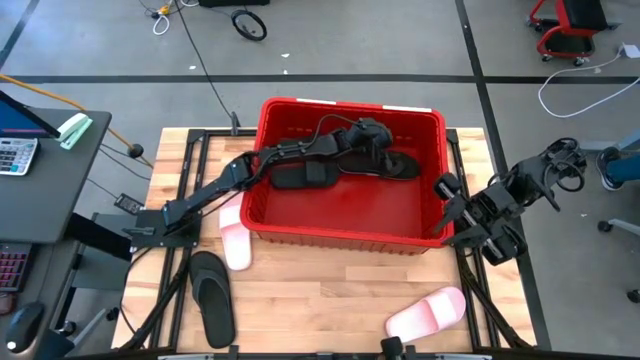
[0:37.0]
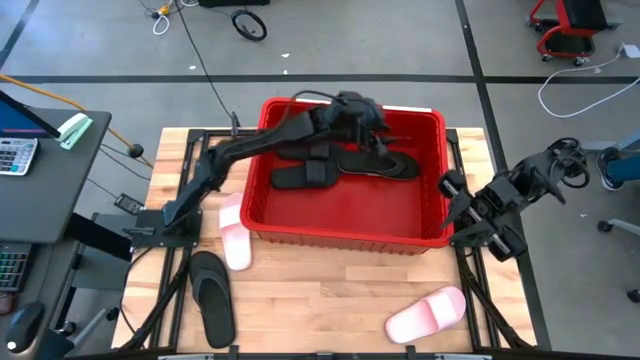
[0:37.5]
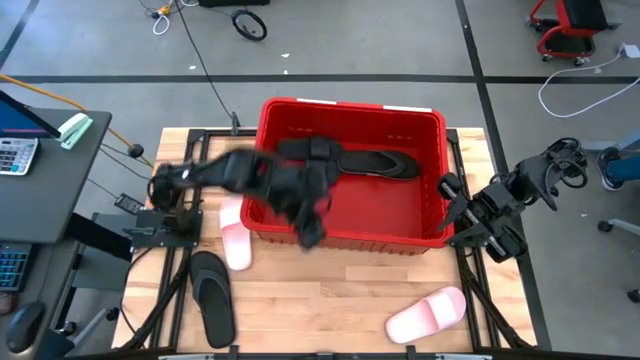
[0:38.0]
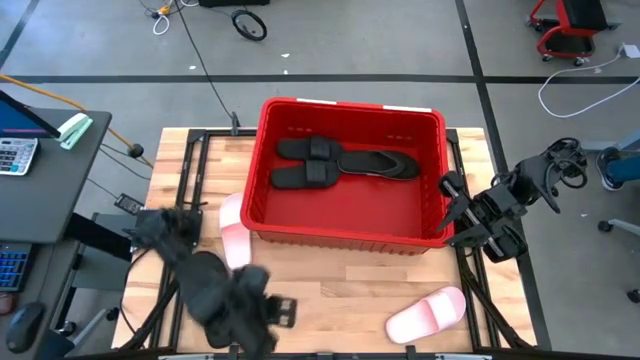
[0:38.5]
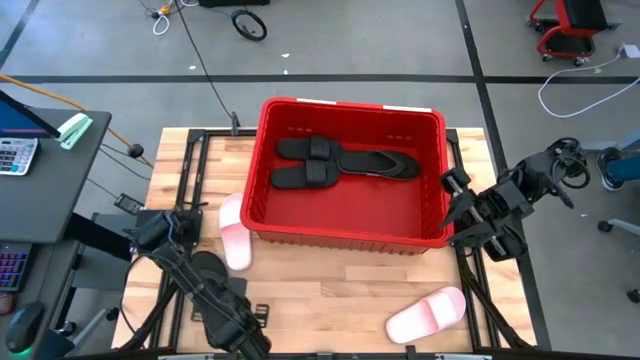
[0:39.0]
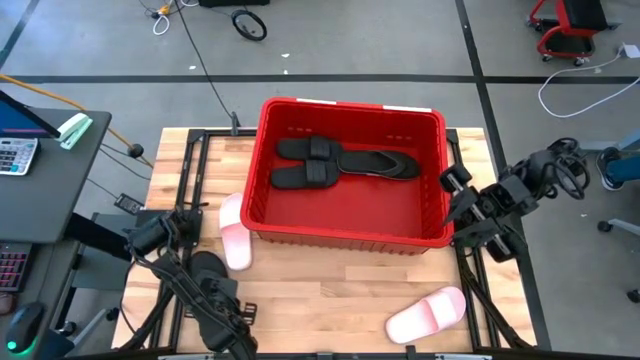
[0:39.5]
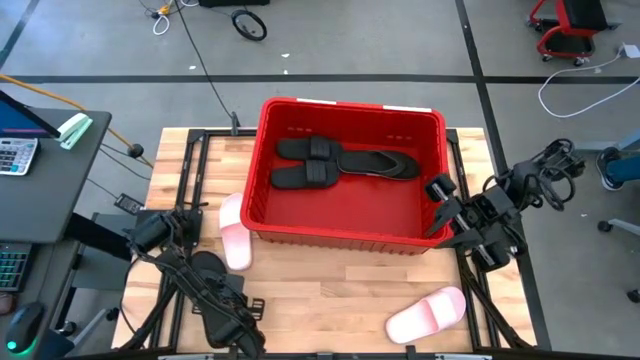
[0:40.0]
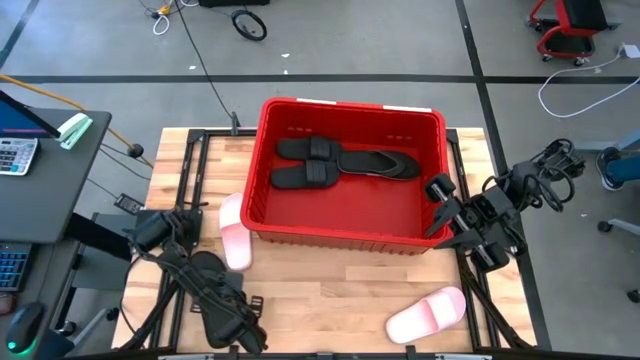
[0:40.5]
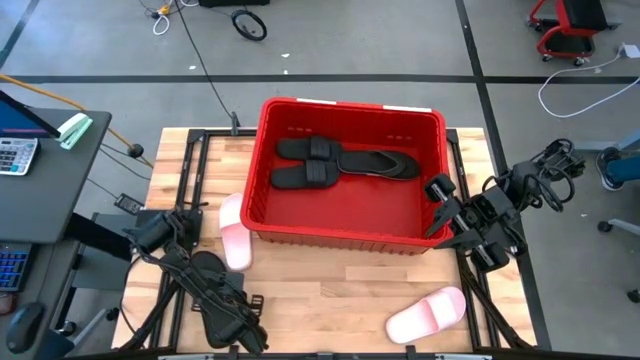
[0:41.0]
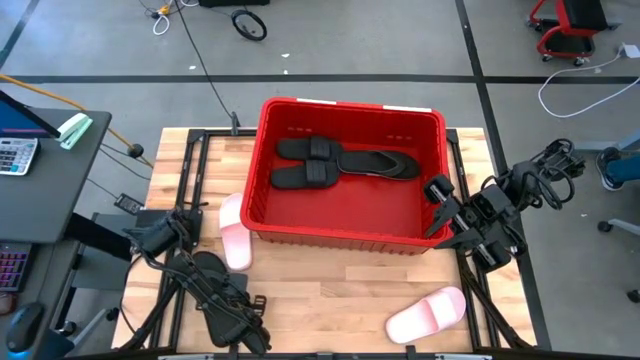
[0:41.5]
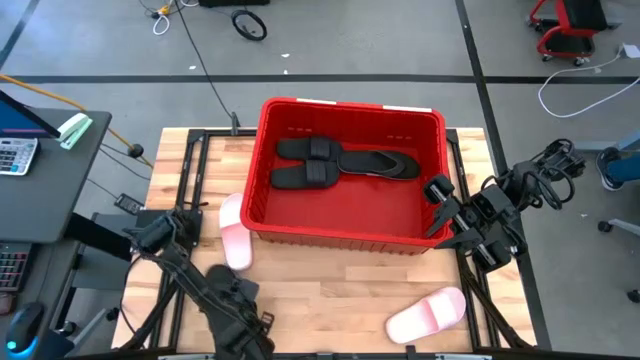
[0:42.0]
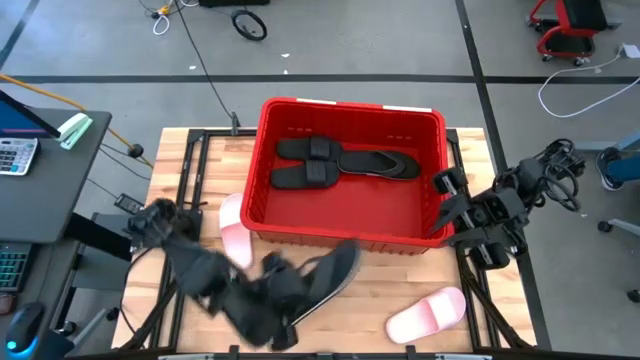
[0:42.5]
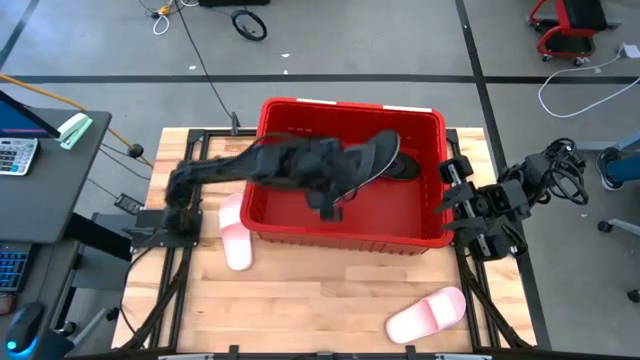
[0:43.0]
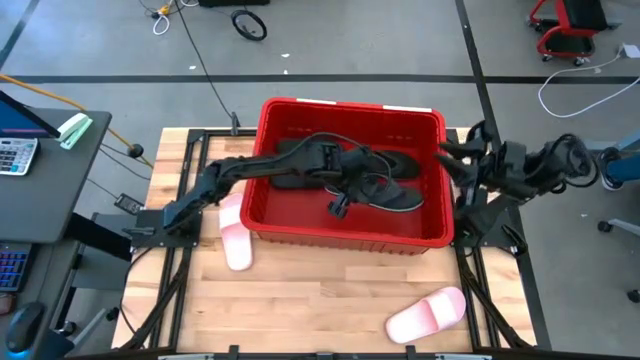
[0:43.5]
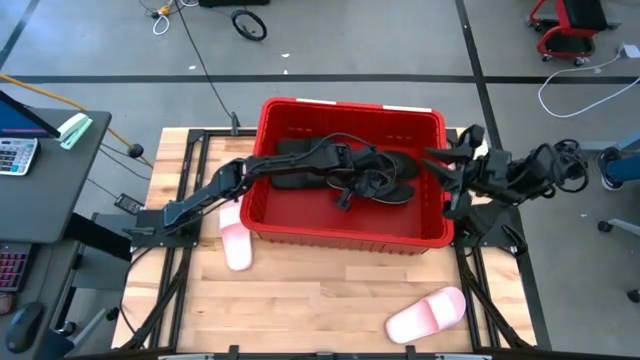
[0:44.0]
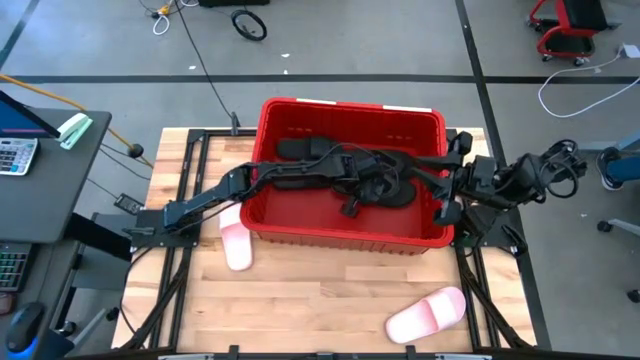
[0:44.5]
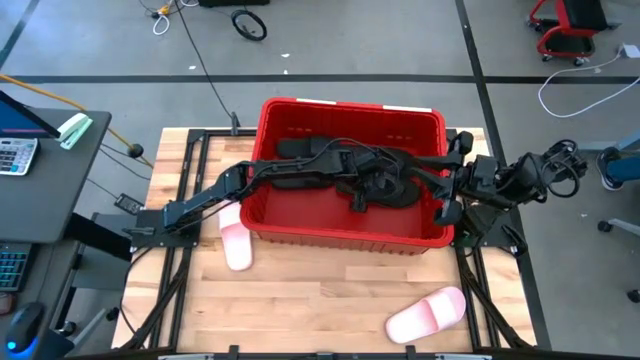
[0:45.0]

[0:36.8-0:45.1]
Task: Pick and place slides into bin
Put the black slipper into the red bin

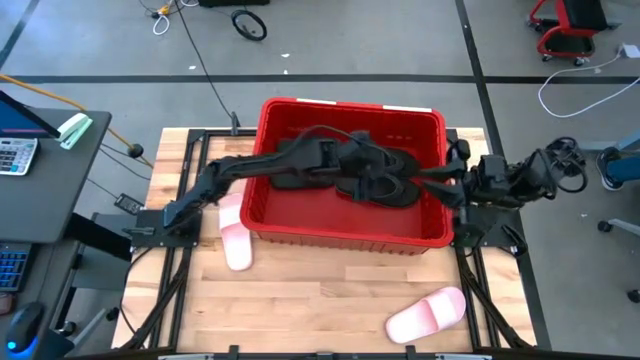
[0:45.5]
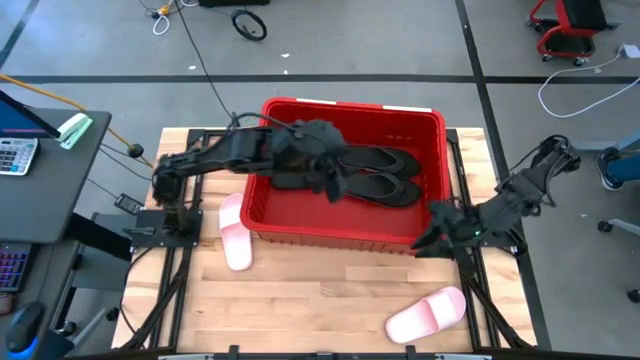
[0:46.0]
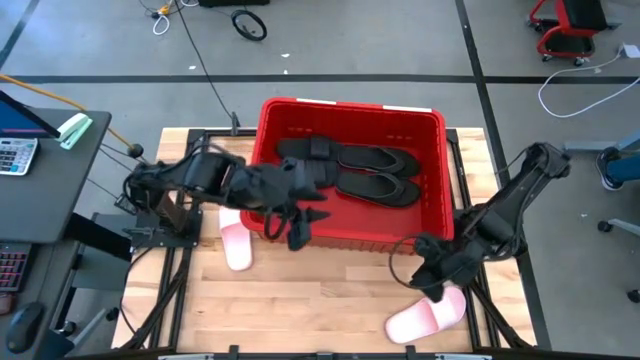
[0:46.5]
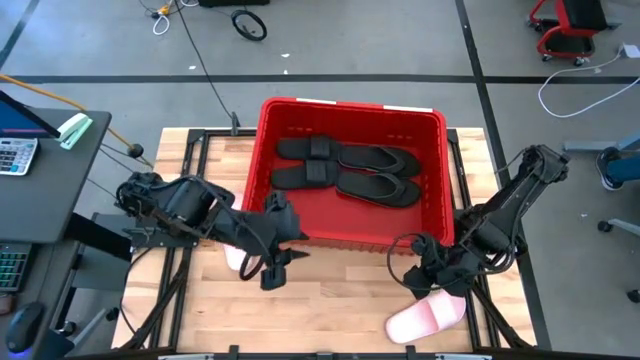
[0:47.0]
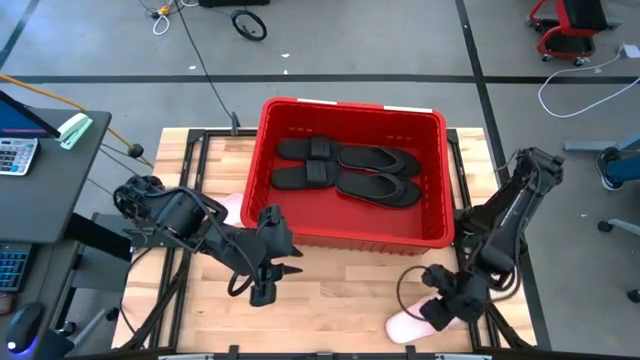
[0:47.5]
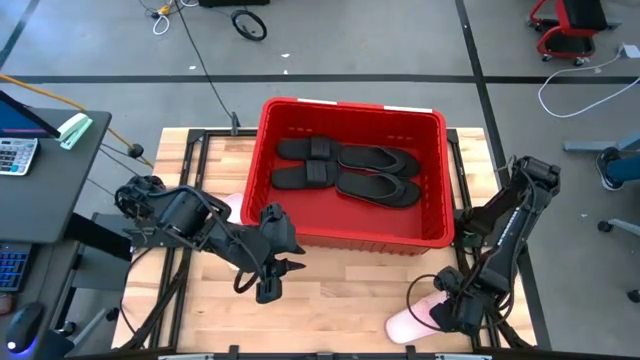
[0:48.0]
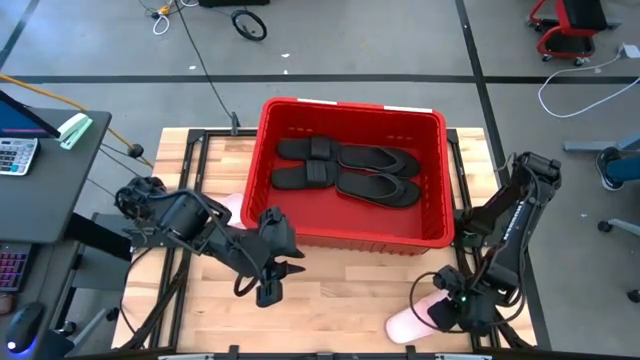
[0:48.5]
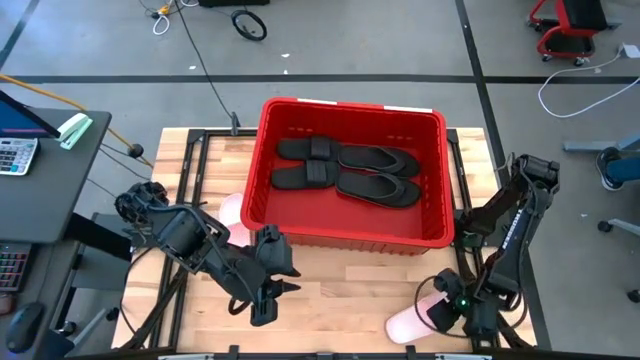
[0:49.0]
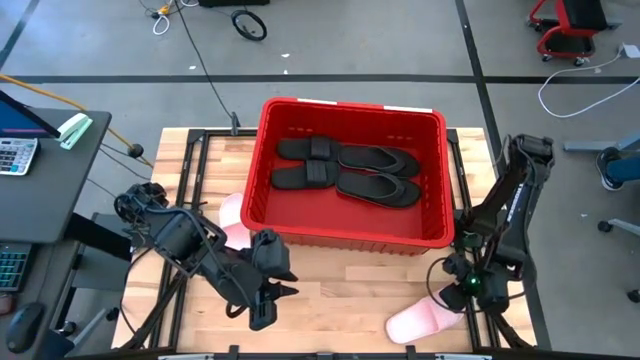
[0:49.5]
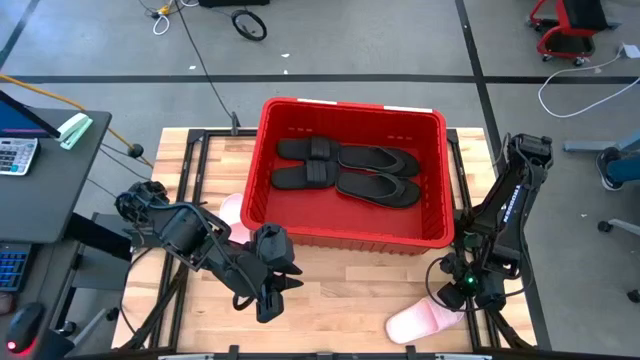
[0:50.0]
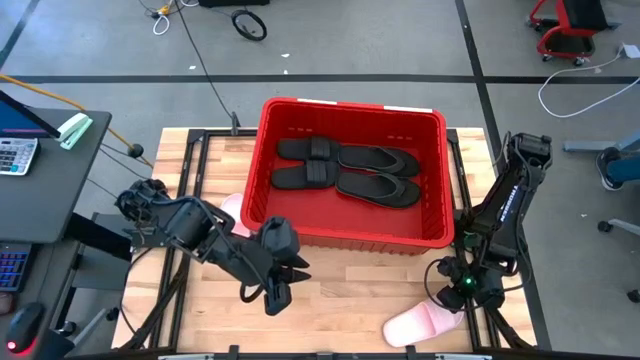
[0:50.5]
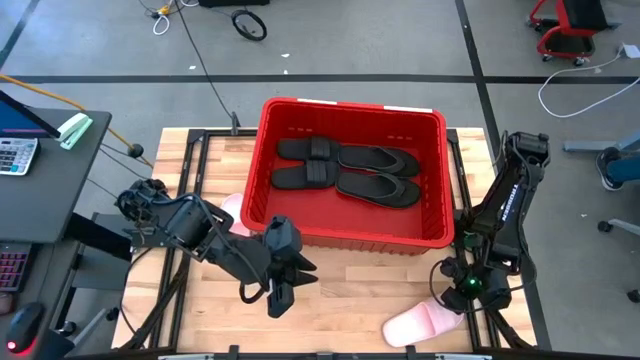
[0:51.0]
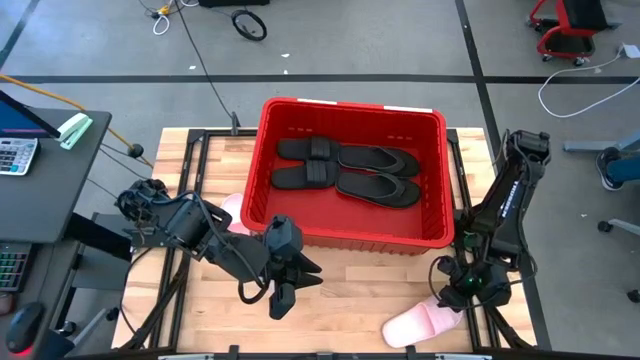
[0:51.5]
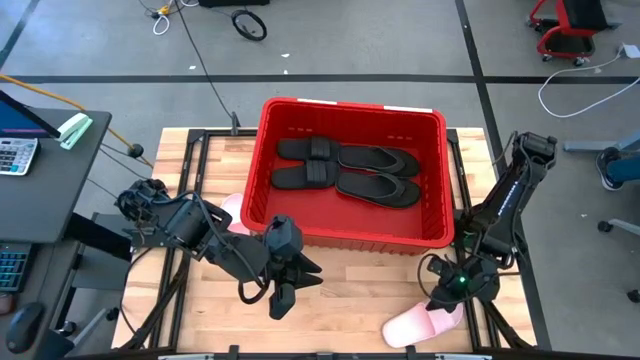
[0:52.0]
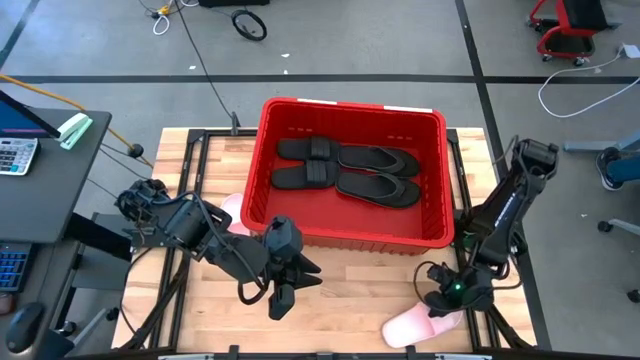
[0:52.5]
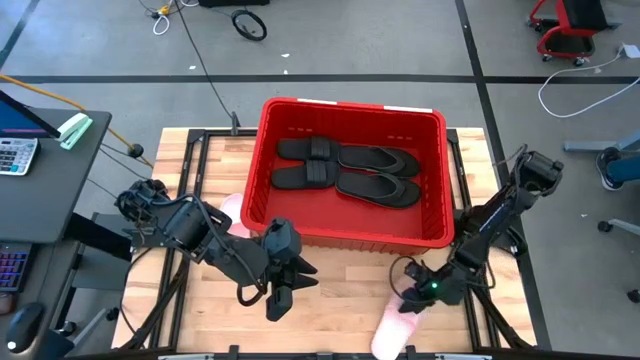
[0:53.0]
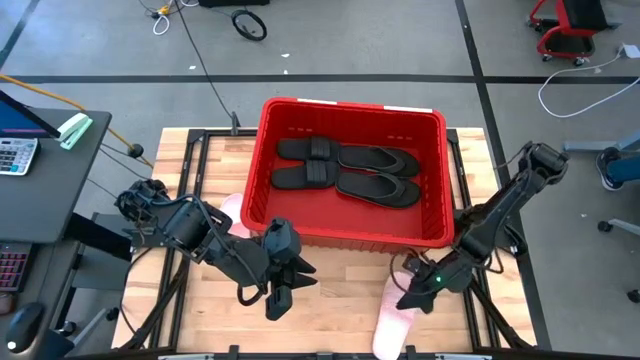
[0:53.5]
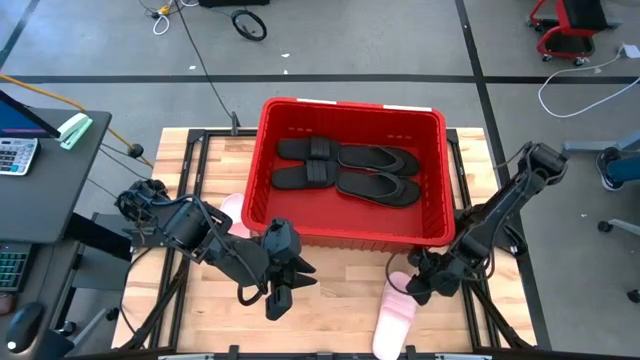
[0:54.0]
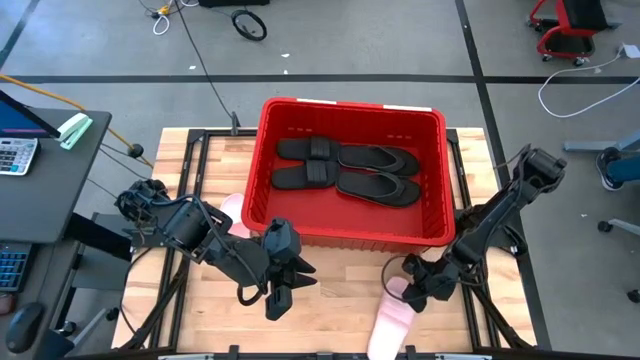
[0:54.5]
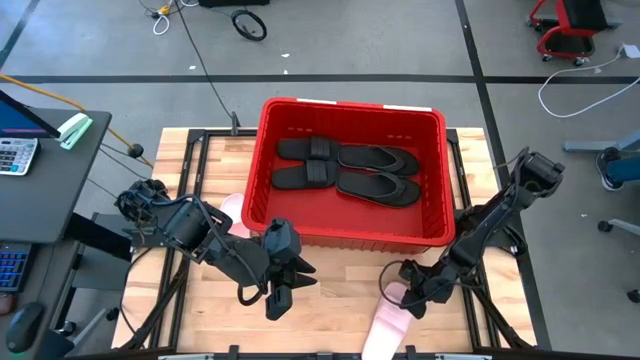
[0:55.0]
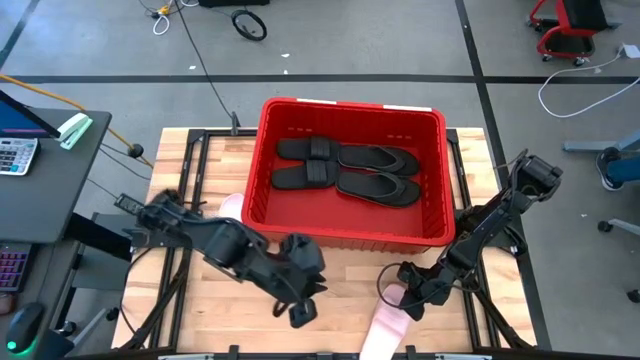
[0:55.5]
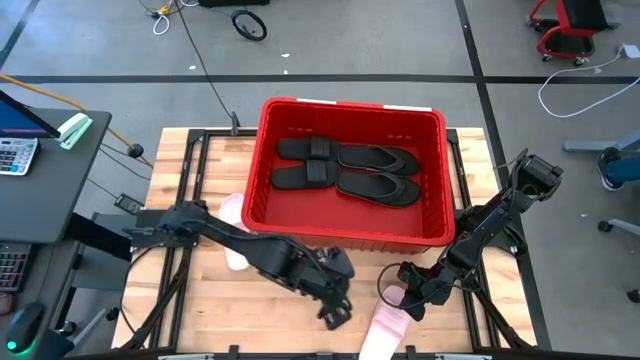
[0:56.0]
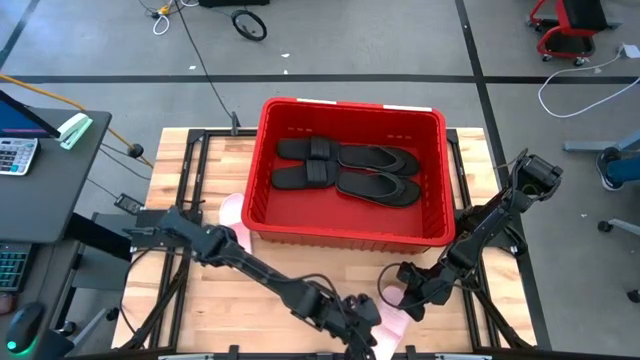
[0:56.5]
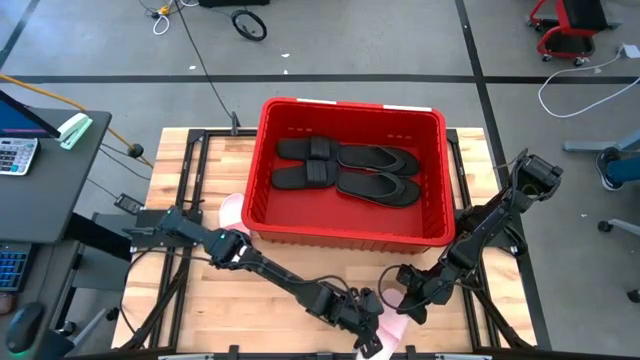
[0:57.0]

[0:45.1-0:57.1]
Put the right pink slide into the red bin
